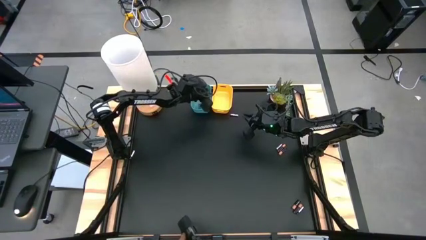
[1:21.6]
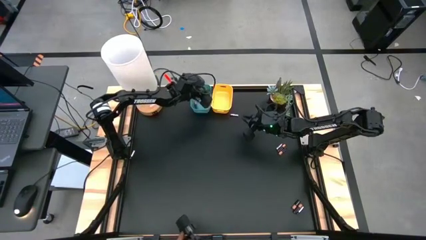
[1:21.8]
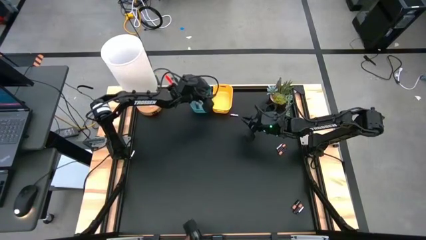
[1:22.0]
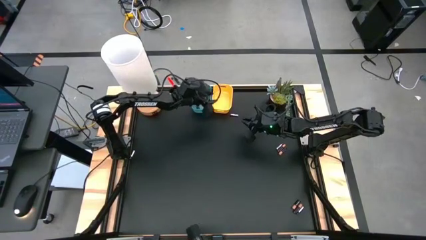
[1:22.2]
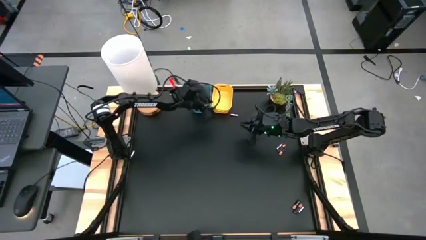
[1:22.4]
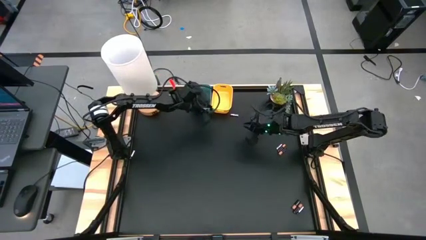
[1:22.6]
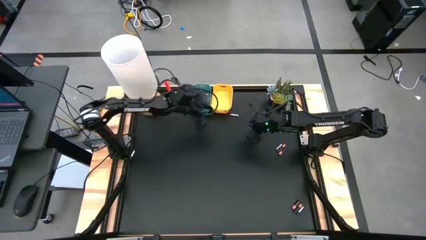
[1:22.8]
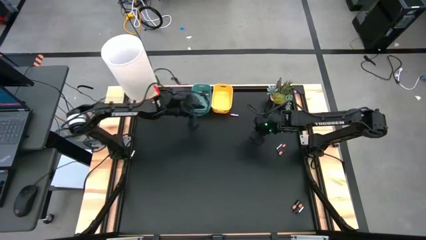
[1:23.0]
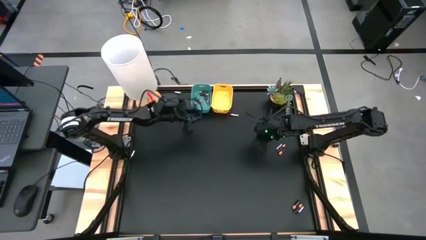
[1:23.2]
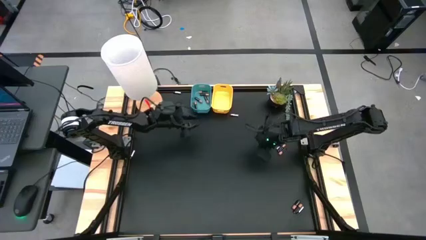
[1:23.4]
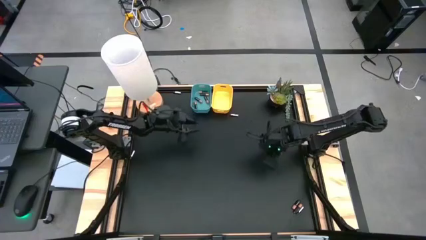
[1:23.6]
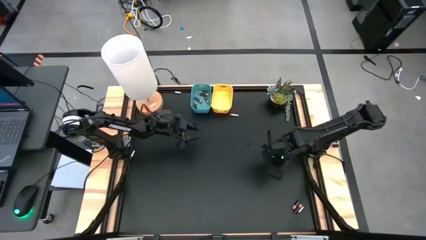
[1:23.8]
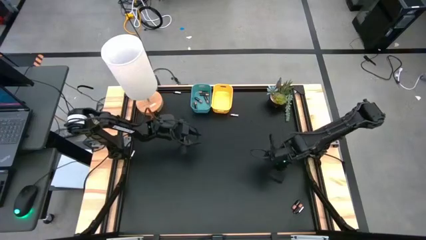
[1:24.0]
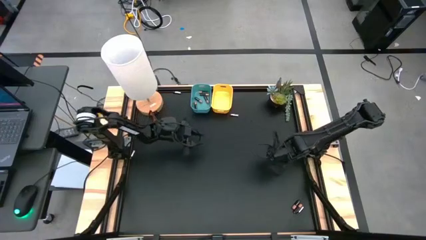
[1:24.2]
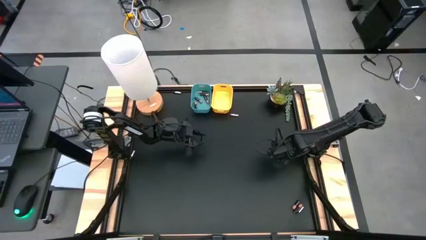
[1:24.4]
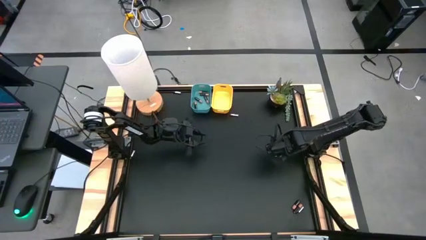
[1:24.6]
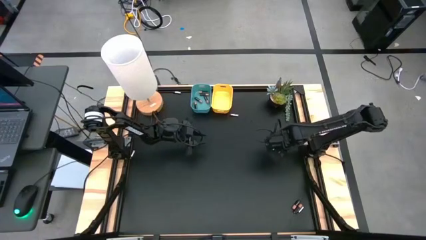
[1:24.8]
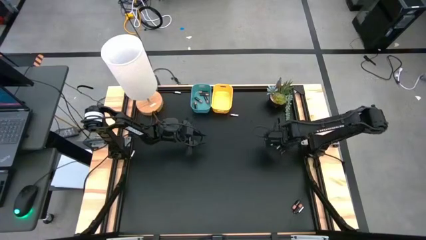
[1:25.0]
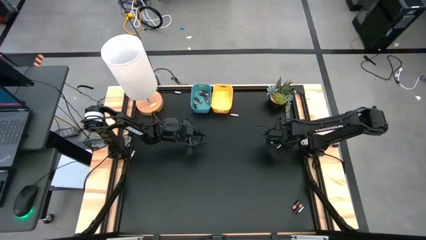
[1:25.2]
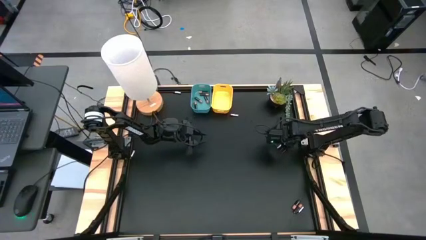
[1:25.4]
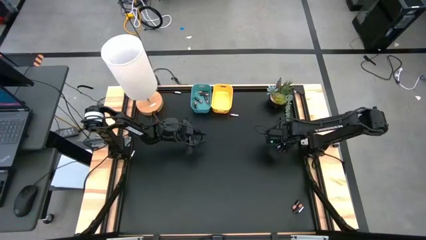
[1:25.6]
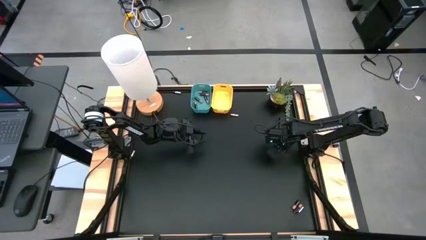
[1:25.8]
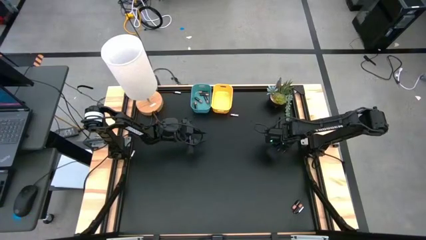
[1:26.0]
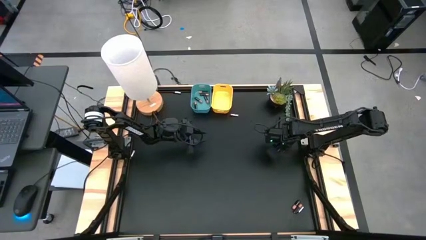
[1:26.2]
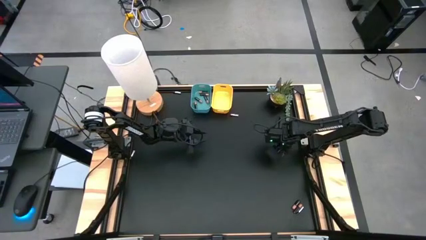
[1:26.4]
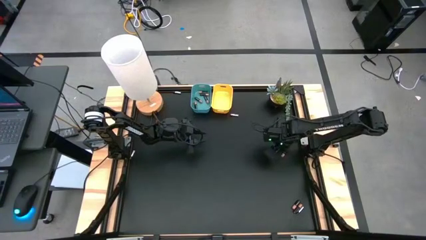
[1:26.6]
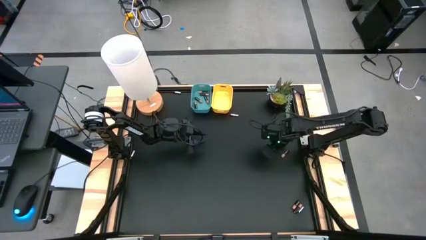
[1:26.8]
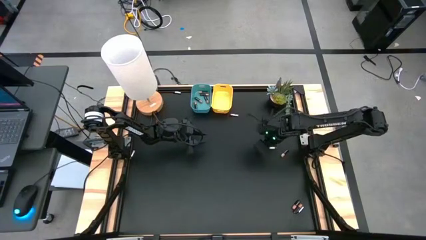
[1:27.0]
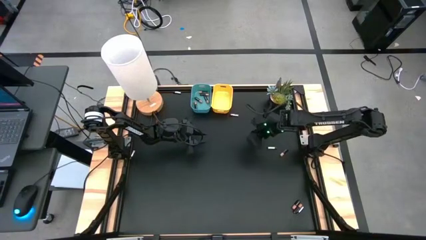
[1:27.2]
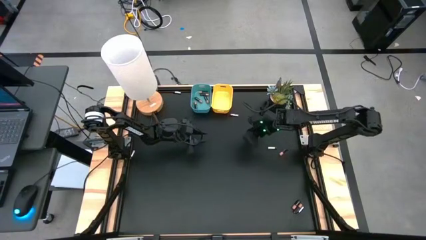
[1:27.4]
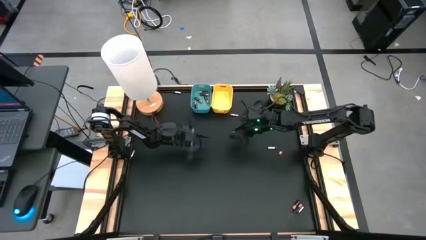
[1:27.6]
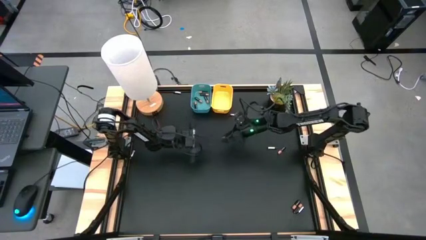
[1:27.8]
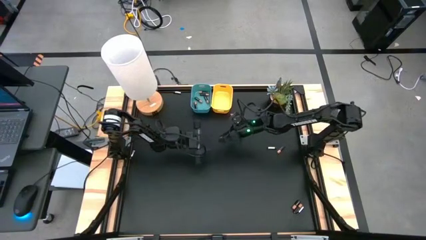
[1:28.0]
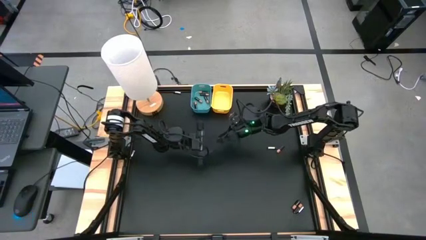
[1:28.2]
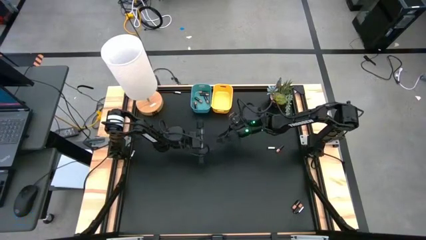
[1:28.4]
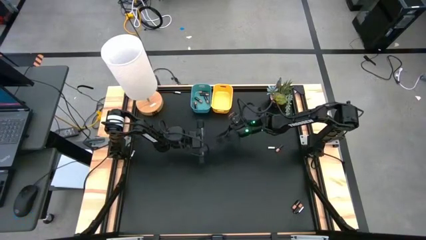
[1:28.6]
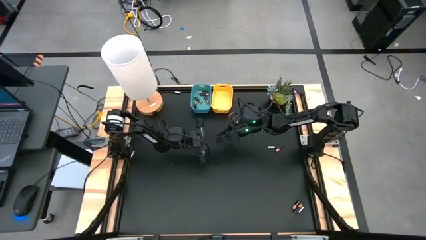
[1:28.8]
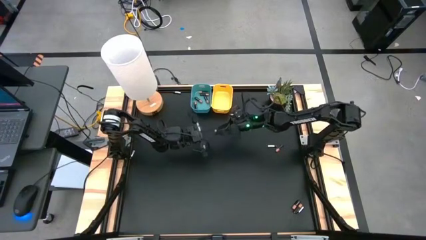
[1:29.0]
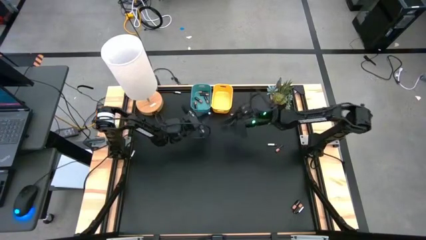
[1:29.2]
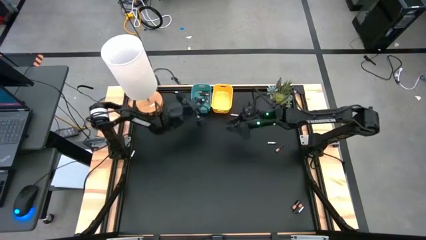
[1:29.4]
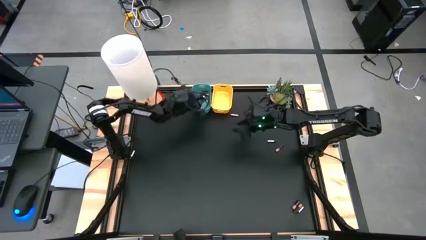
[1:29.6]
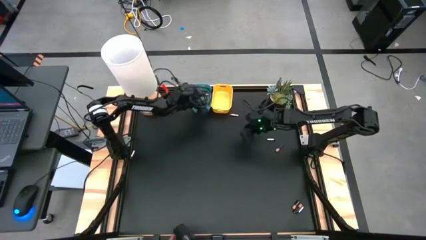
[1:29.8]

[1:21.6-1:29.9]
Task: Sort batteries
Put the gold black battery into the blue bin

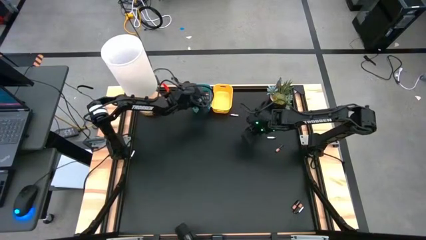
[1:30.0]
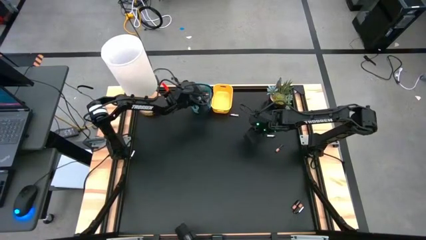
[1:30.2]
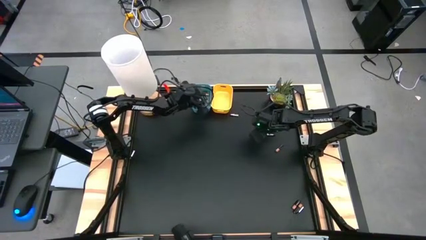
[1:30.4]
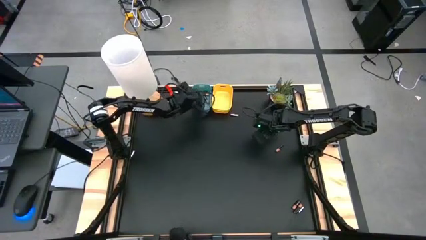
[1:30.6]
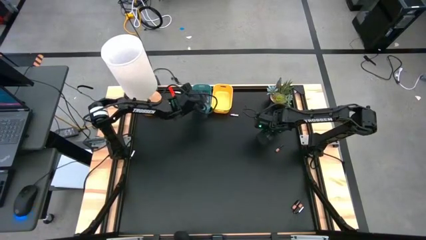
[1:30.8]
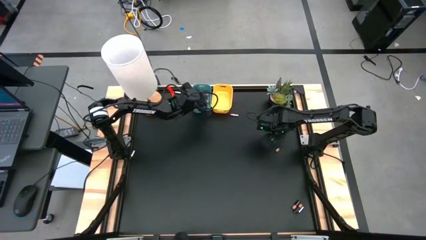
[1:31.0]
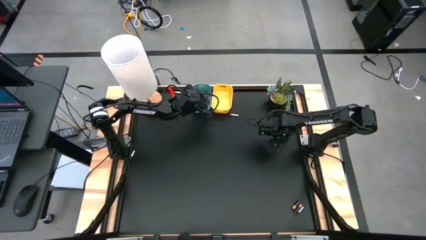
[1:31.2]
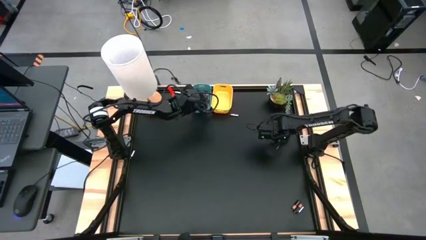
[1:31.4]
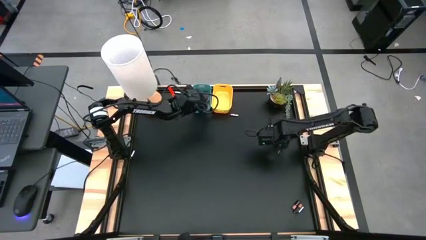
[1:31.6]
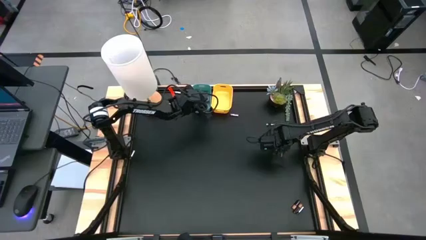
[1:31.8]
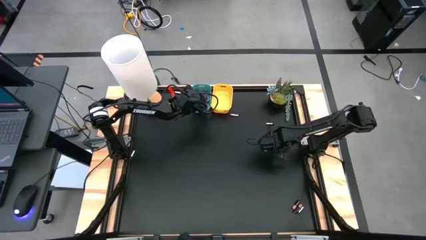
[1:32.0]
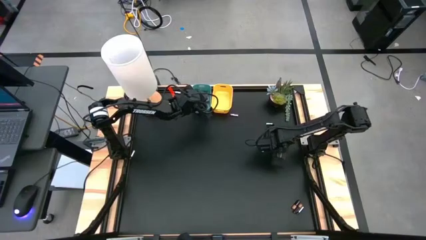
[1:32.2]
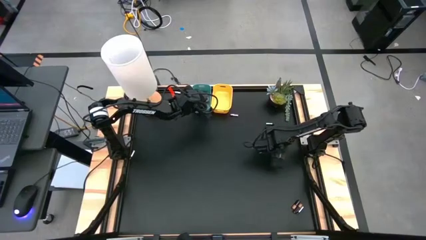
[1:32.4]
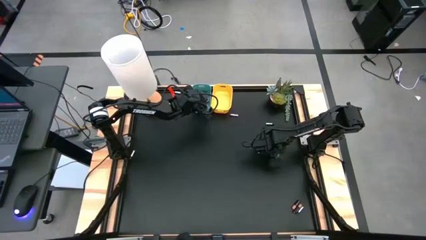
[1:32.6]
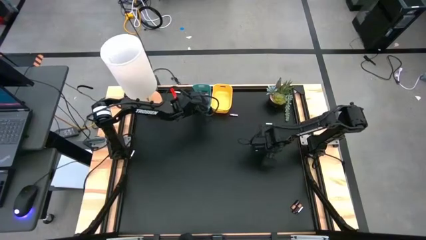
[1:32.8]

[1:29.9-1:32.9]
Put the gold black battery into the blue bin

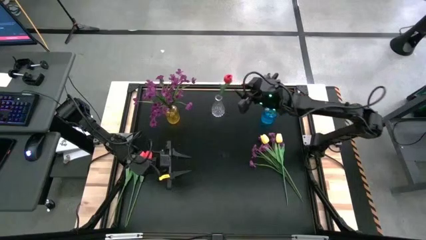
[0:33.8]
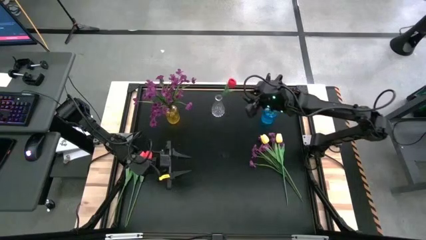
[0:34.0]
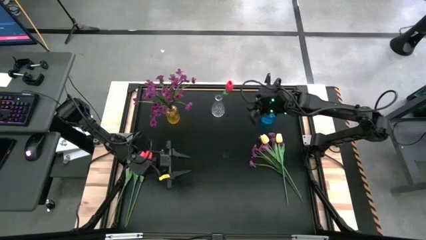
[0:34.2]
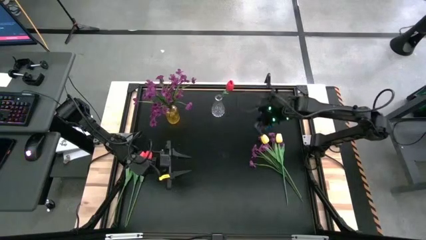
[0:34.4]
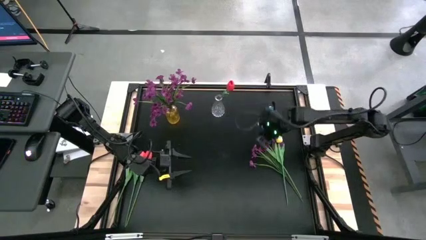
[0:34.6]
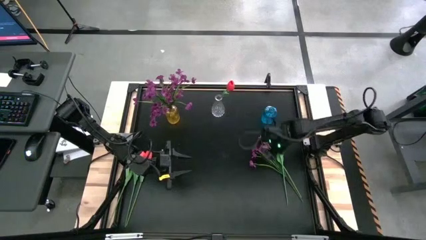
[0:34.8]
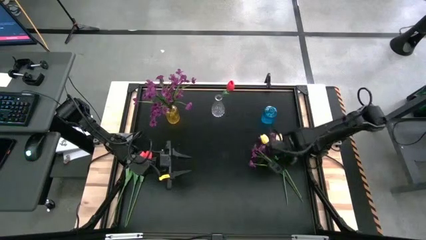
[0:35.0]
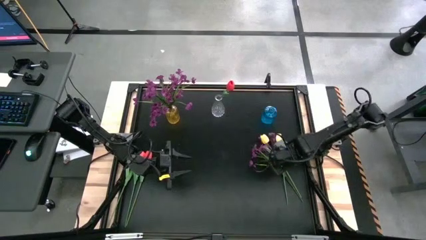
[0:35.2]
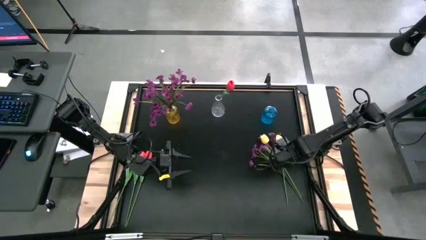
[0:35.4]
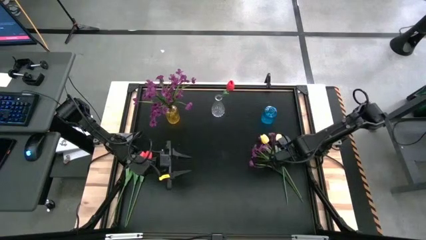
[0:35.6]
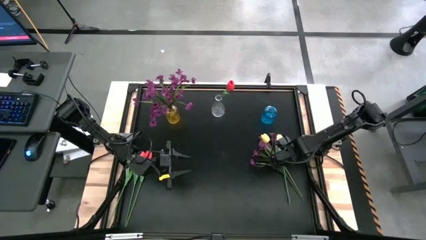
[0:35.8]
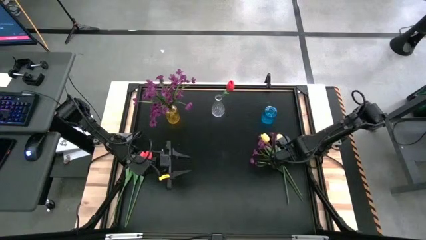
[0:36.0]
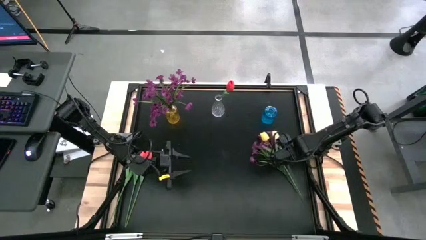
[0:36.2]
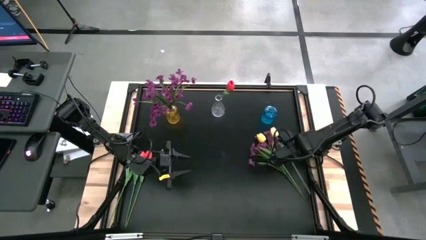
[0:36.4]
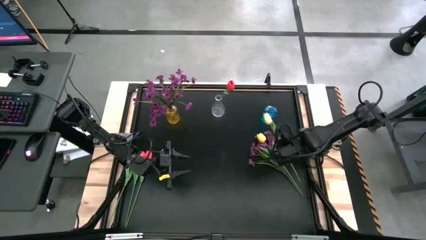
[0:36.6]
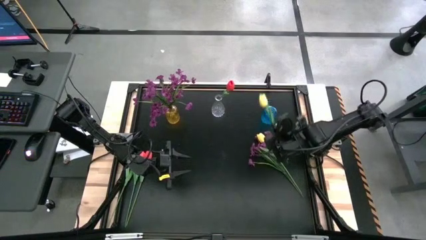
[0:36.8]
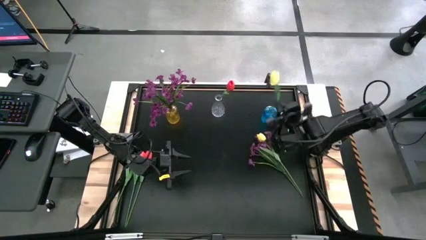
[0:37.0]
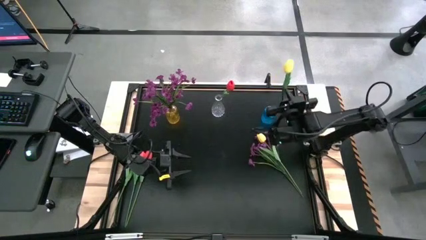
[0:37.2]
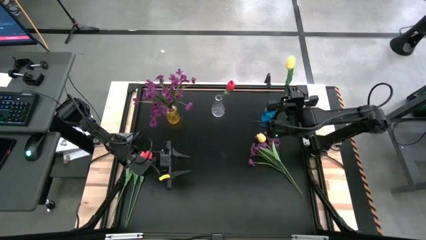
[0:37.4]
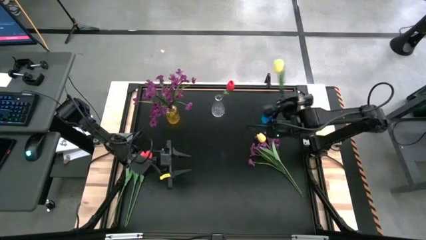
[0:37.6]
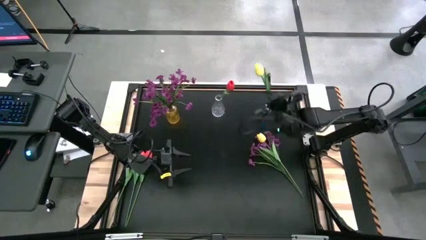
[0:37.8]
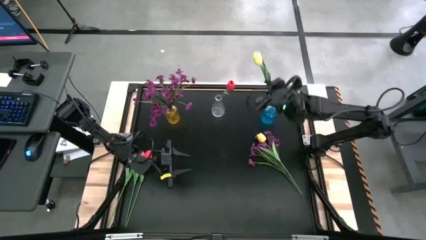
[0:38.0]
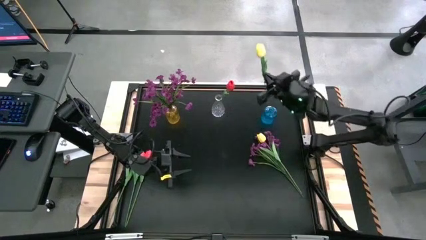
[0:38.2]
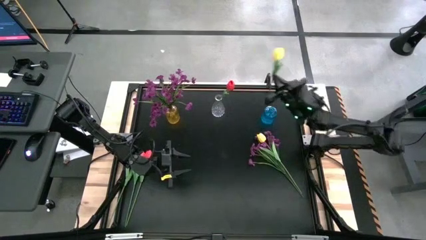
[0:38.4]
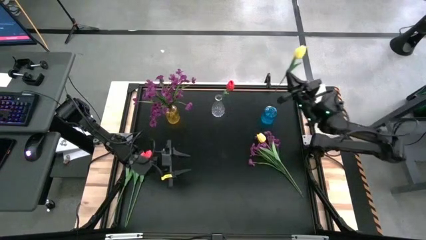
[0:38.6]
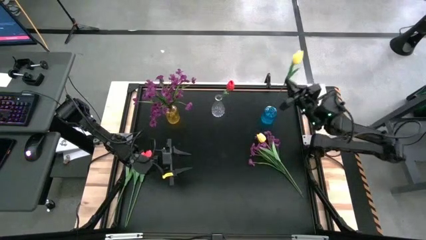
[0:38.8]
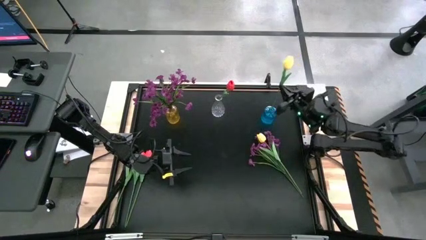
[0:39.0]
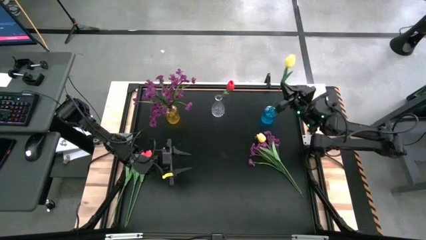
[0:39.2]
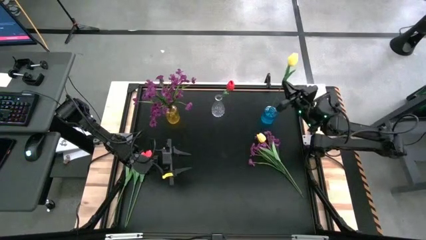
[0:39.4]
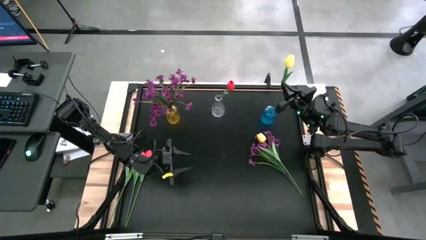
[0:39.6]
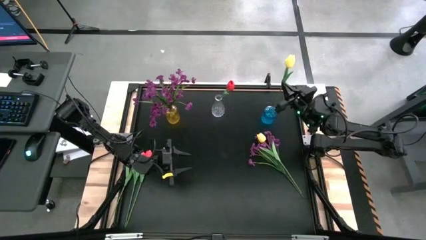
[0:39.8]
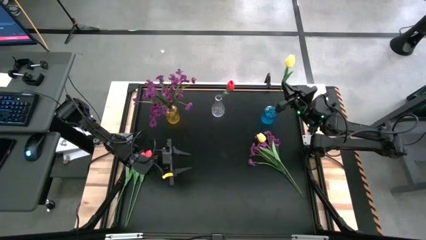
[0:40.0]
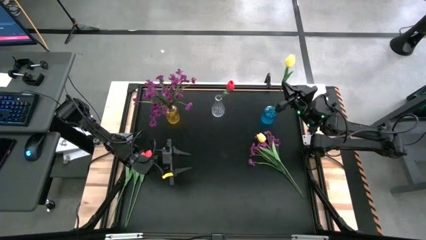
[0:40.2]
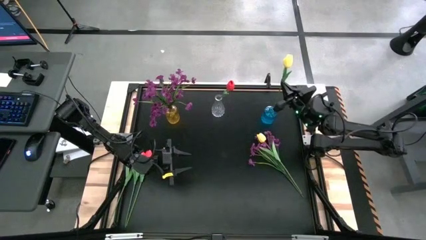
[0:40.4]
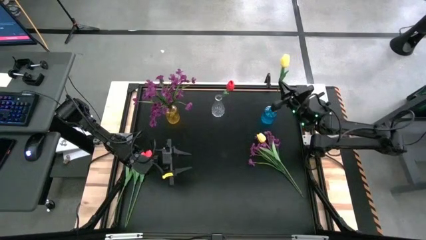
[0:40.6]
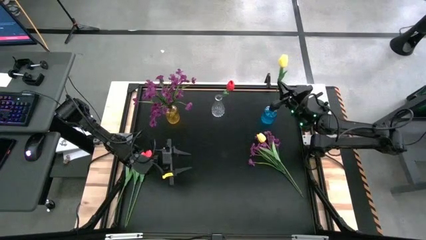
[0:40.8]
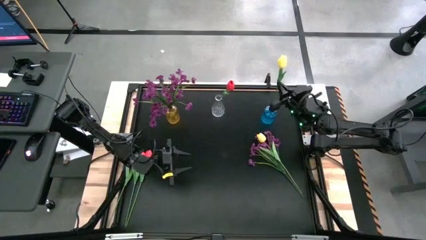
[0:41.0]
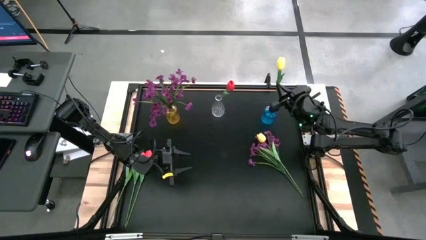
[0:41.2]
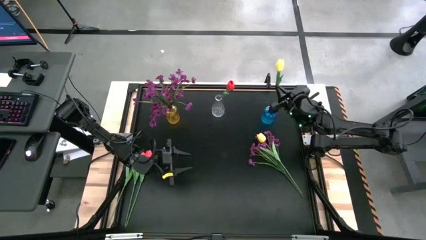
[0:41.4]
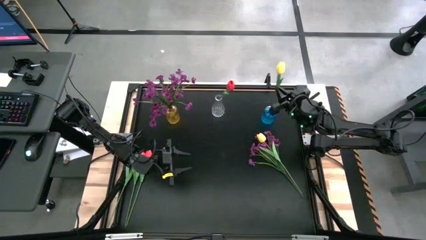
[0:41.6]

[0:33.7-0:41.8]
Task: Sort flowers into vase by color
Put the right yellow flower into the blue flower vase
